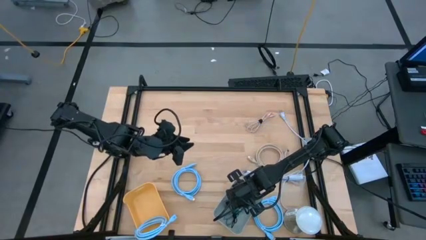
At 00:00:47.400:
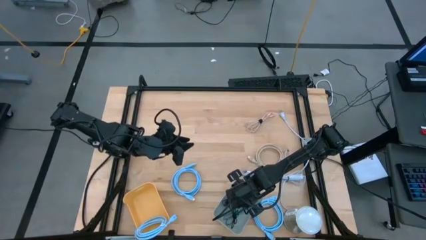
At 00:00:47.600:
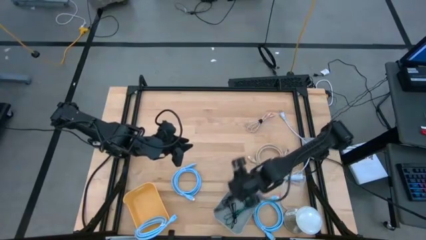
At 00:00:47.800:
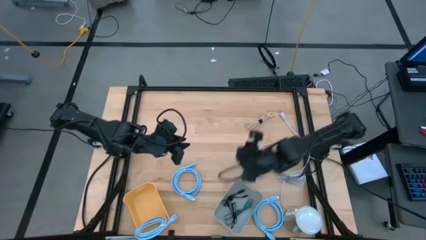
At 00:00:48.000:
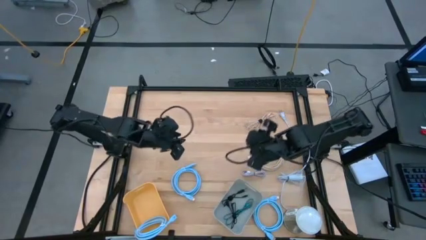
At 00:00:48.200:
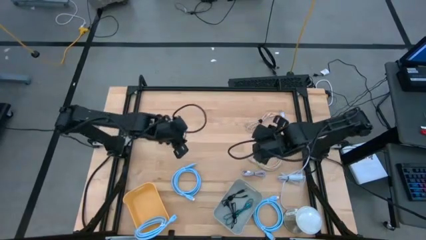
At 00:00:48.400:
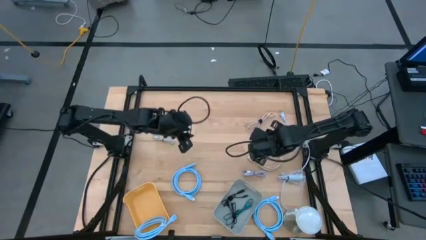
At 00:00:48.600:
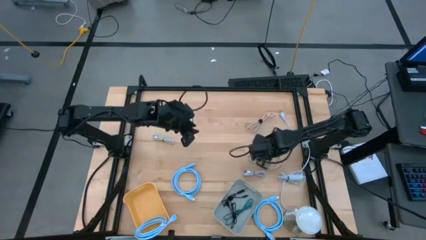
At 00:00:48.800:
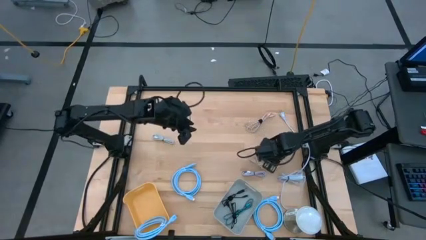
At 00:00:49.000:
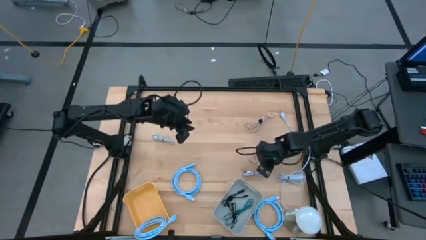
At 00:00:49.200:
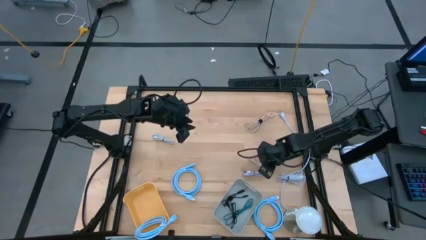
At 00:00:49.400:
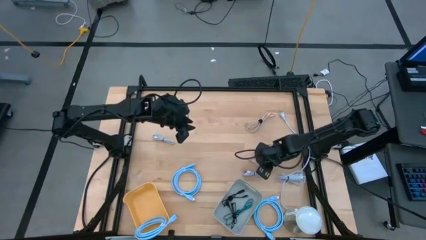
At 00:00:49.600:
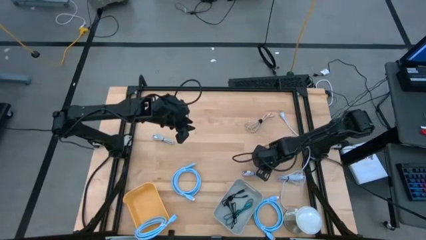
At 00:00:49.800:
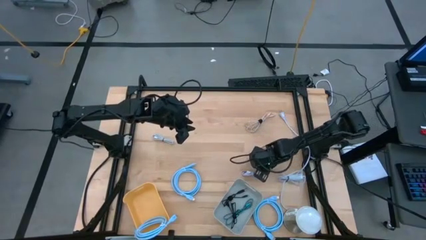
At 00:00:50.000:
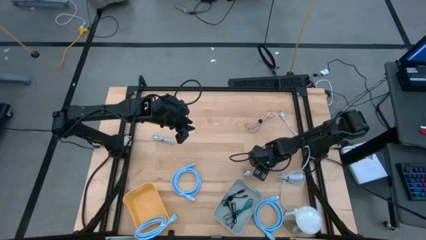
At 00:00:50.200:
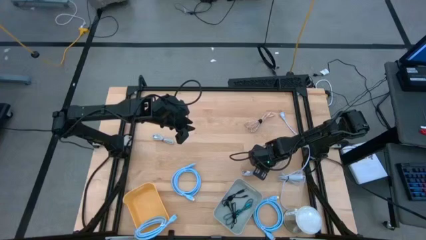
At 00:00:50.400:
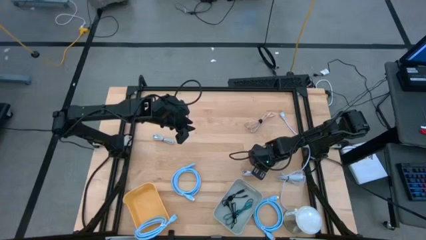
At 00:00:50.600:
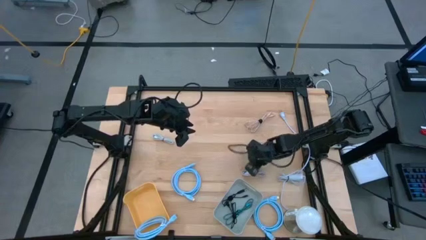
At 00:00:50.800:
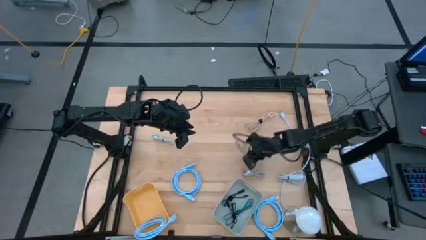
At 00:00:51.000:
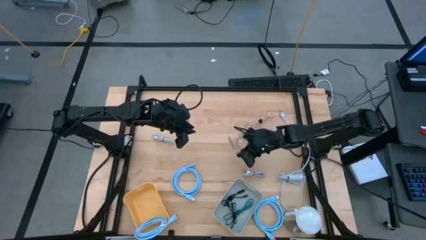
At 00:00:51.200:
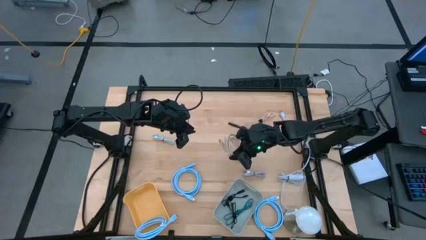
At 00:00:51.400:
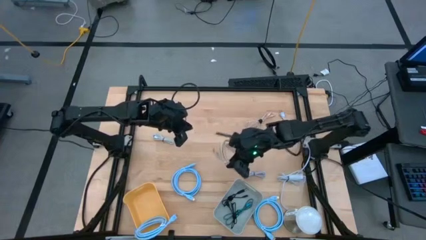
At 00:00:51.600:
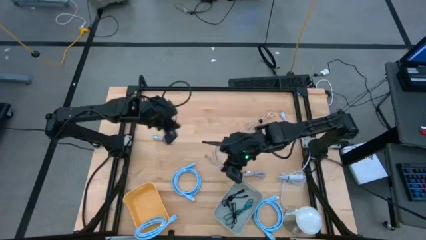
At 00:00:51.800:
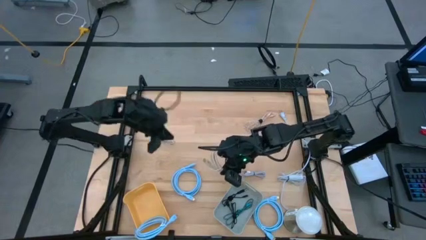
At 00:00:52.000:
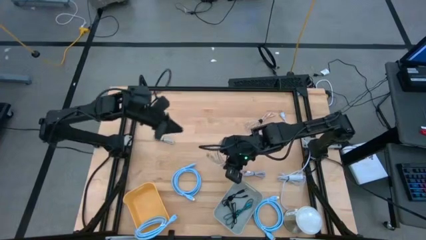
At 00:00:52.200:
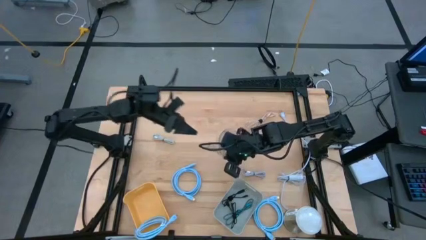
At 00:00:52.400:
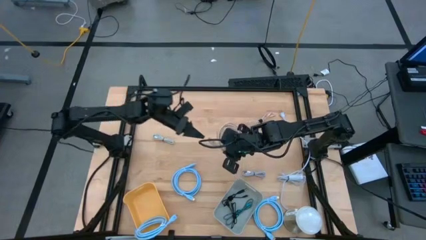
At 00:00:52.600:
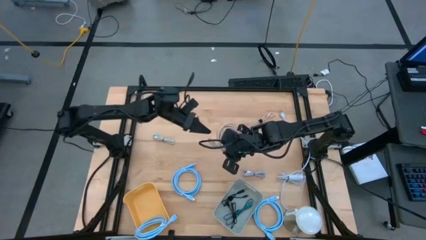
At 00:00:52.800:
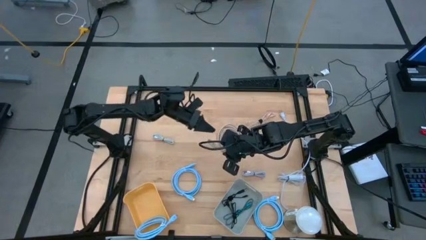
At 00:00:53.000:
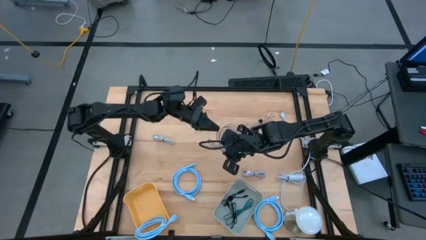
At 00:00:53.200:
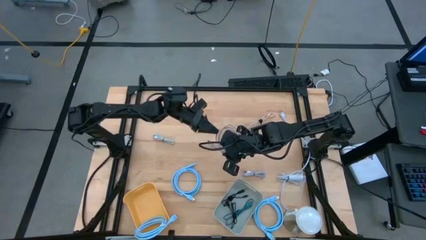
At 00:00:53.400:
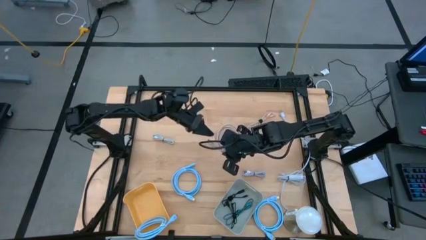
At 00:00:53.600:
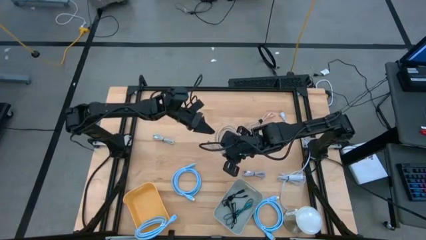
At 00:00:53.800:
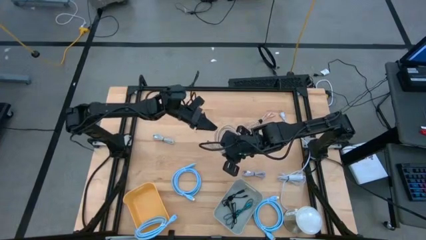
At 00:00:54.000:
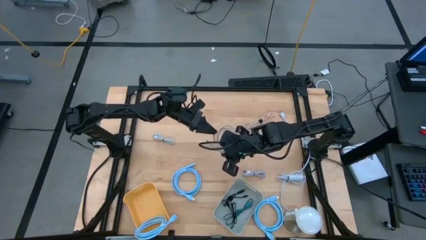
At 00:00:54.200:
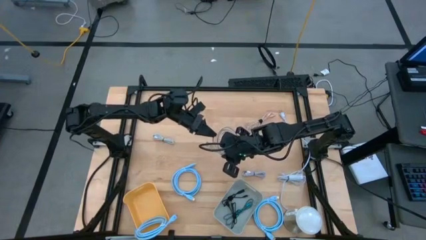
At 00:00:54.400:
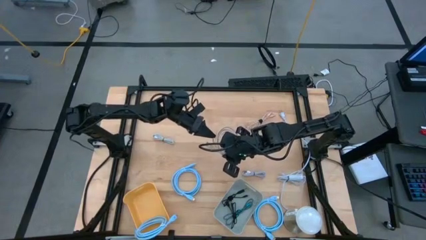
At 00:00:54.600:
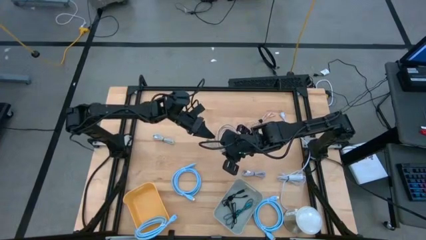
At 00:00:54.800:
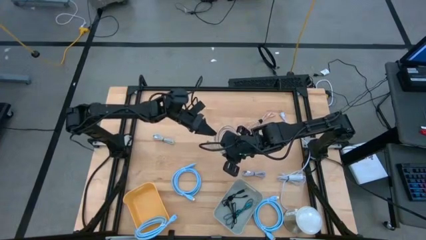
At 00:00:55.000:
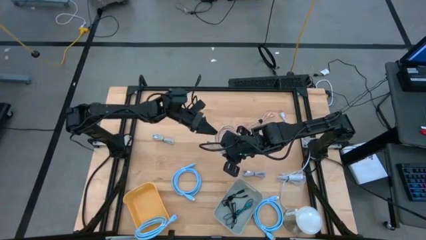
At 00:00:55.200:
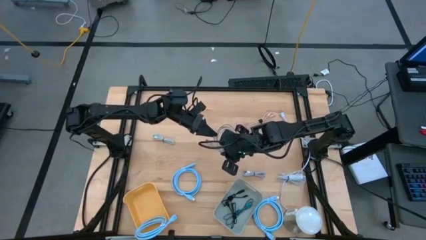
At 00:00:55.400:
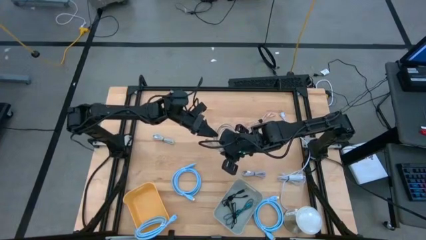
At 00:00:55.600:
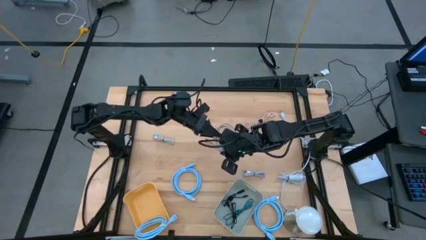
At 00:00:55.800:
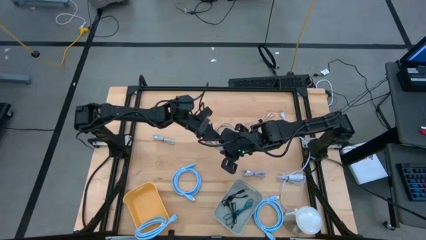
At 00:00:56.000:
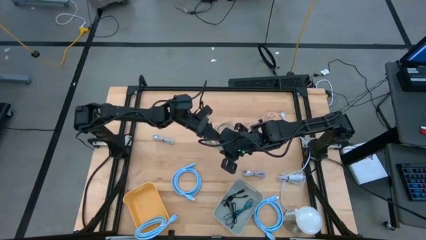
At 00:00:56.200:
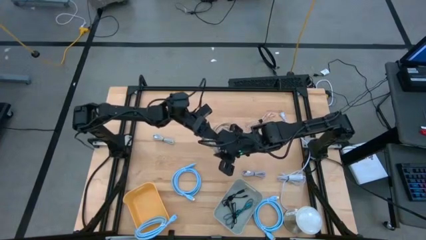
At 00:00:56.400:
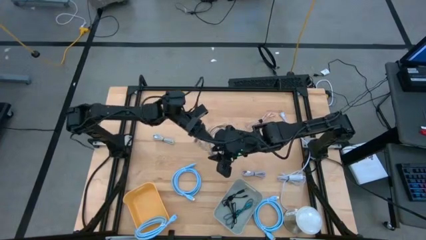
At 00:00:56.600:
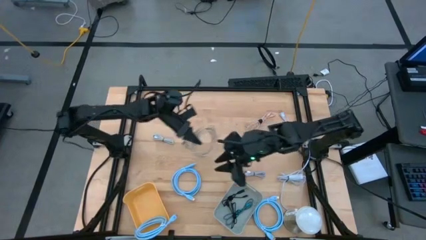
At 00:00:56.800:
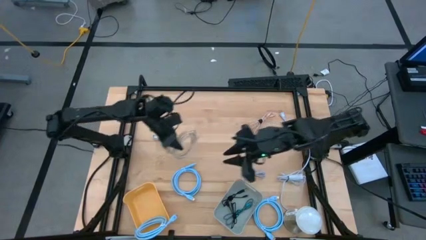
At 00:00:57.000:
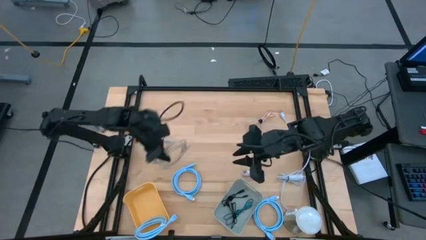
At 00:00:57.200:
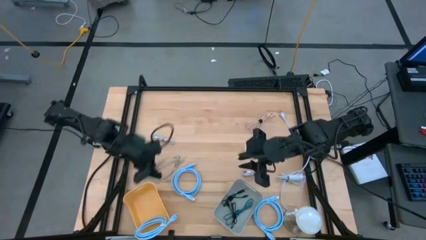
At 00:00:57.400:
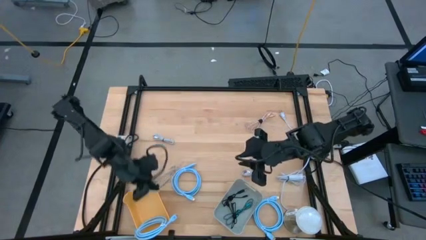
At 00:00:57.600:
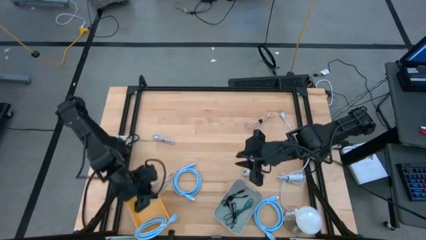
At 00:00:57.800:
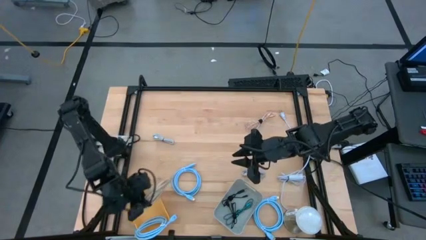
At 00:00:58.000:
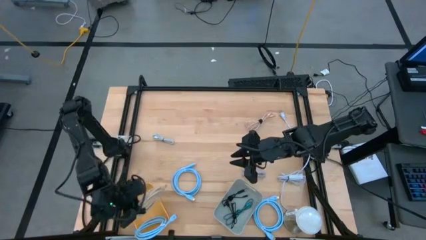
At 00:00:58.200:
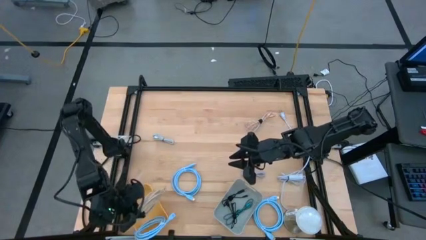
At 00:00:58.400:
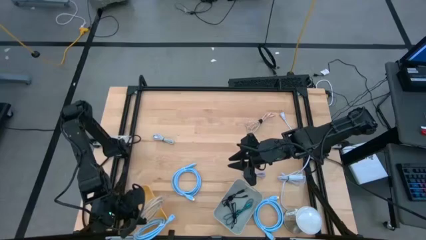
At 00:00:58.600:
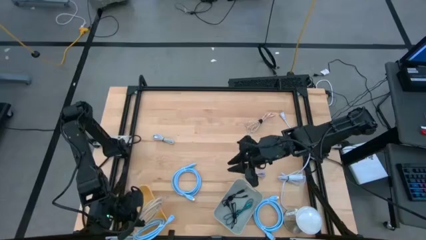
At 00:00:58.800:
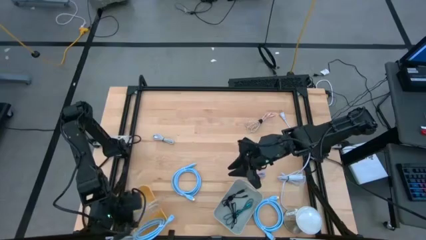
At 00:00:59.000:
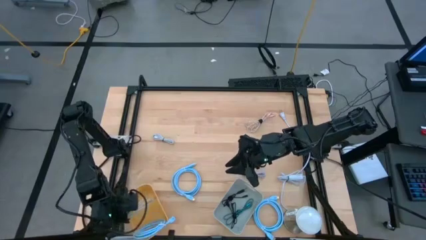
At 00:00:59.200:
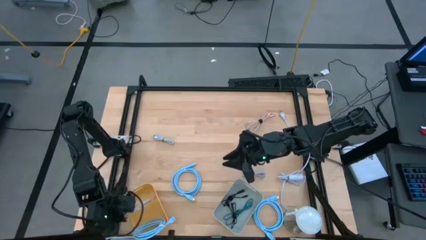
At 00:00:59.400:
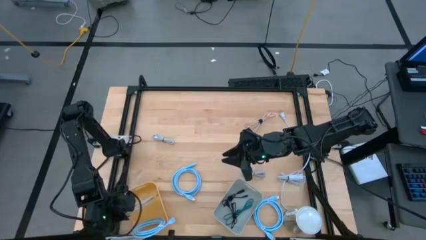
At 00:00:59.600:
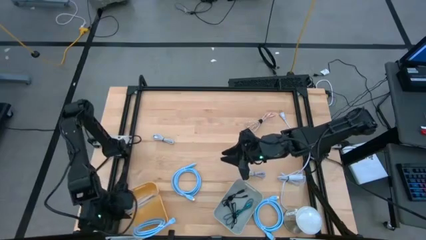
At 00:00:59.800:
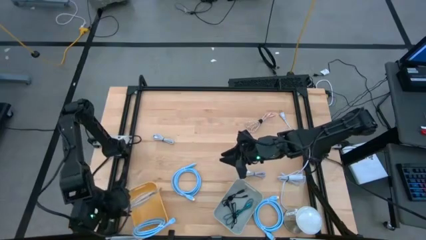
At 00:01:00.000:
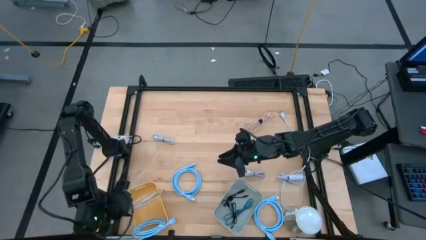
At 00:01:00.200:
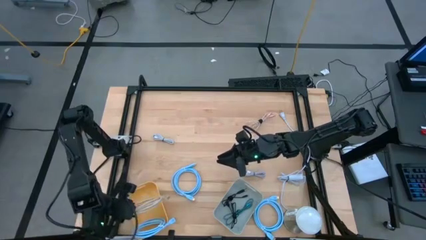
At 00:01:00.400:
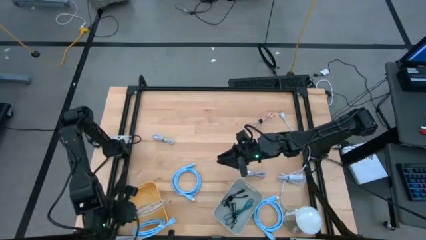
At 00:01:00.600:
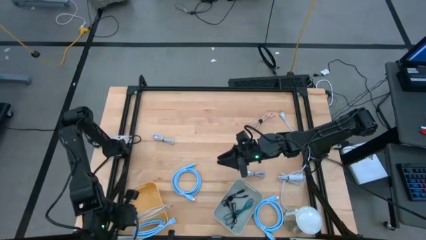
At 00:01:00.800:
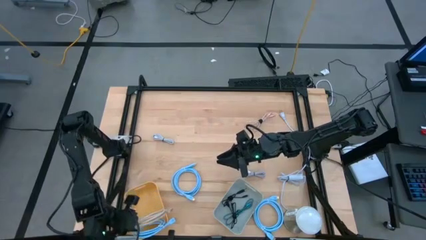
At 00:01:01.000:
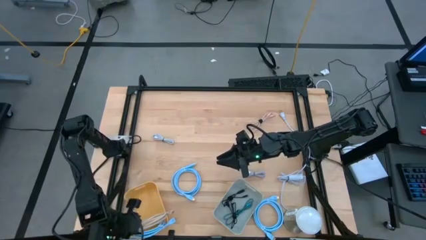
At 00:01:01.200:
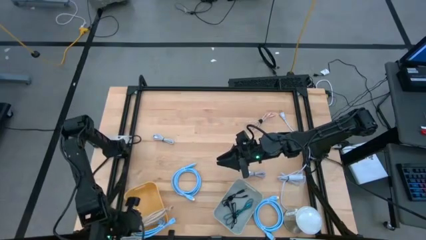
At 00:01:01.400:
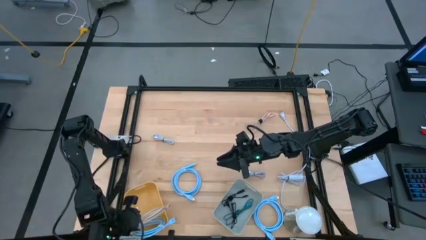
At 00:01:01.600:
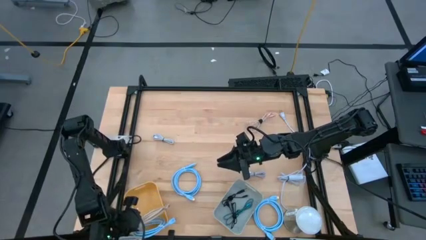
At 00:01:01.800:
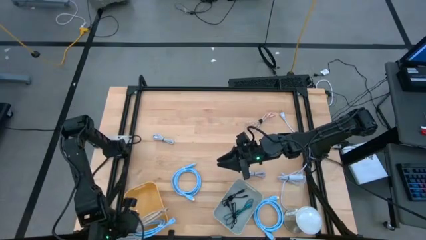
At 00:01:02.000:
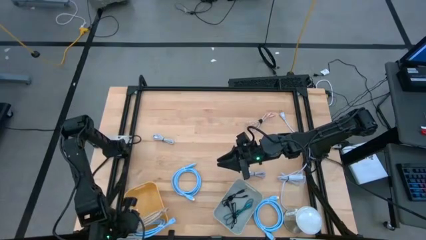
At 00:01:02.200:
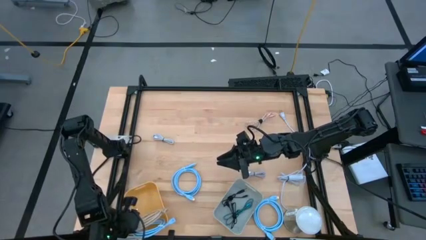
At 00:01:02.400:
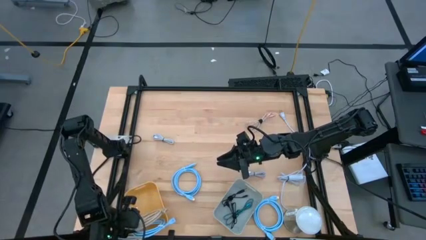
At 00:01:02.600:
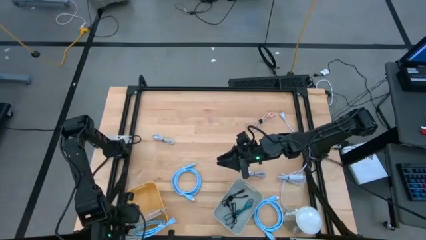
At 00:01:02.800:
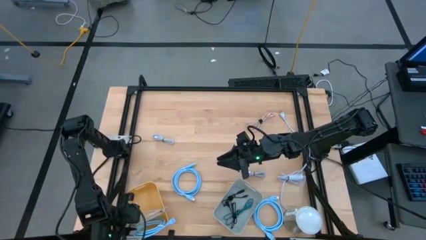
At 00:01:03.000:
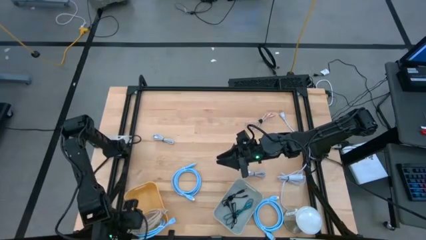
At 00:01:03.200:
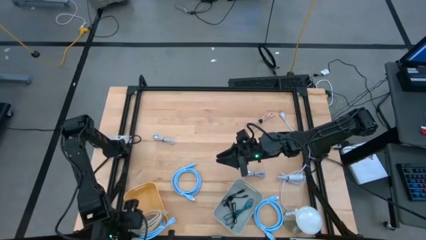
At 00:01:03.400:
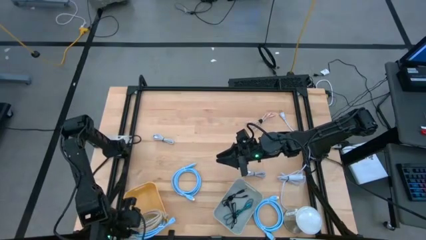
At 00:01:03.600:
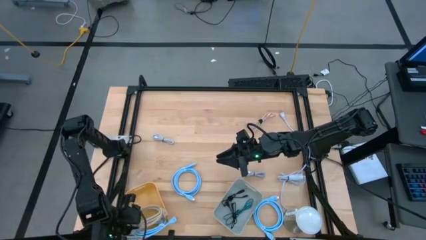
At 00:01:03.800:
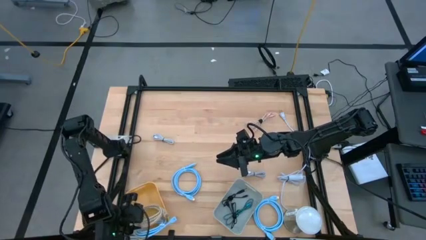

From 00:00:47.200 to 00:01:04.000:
Task: Sort cables
Put the brown HDMI cable into the yellow bin
